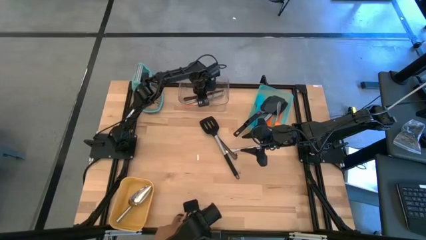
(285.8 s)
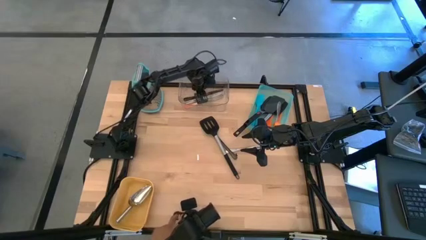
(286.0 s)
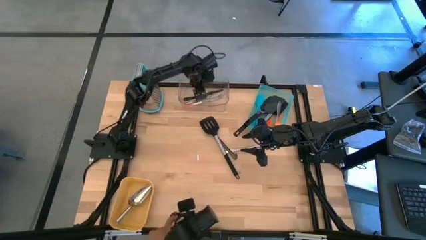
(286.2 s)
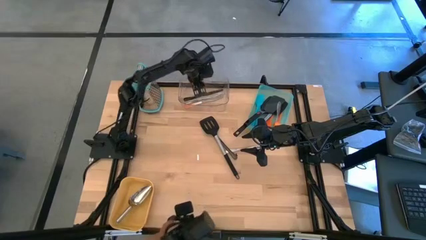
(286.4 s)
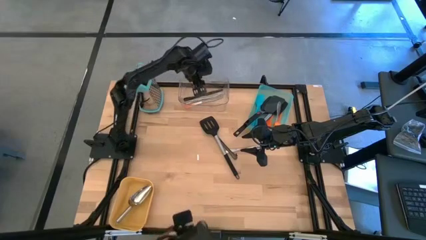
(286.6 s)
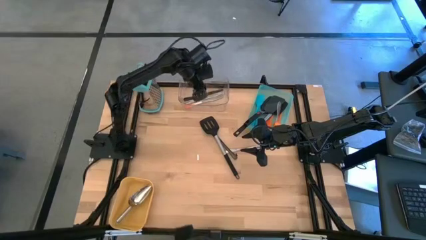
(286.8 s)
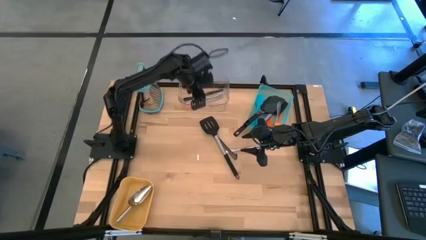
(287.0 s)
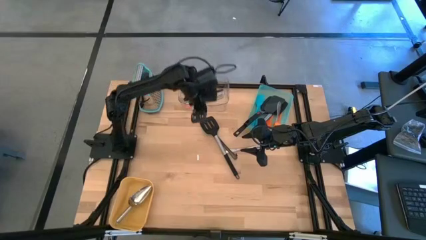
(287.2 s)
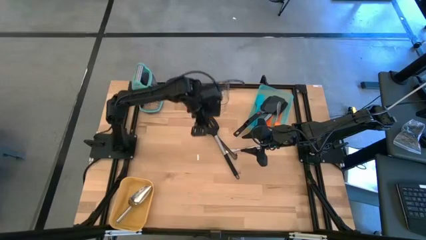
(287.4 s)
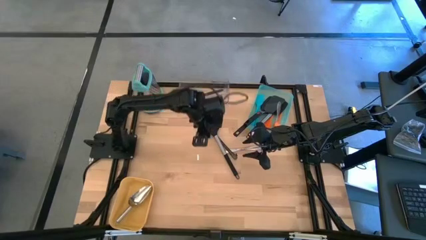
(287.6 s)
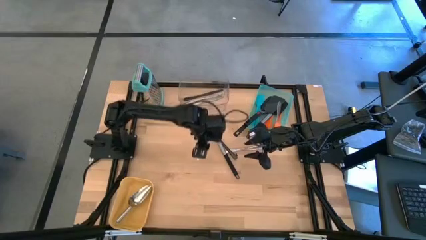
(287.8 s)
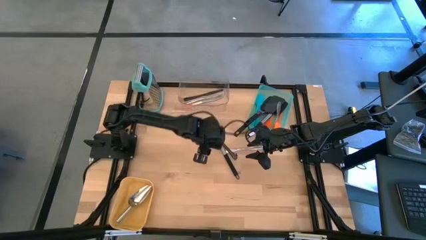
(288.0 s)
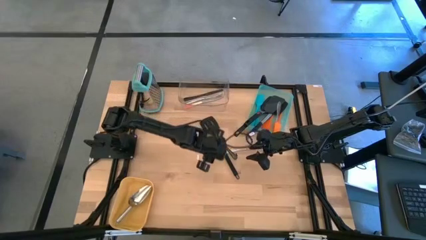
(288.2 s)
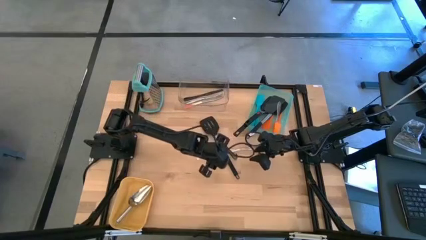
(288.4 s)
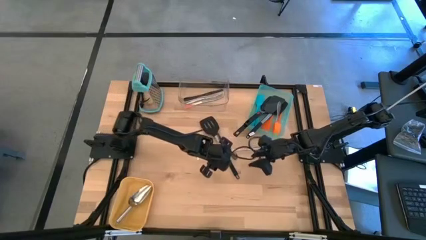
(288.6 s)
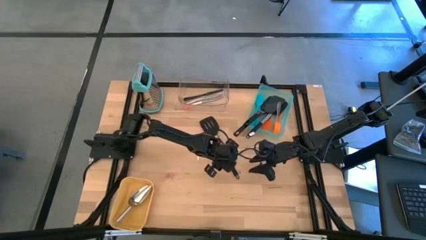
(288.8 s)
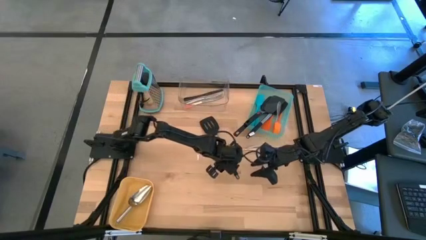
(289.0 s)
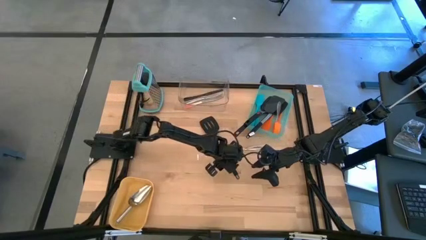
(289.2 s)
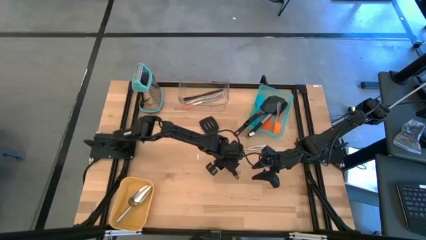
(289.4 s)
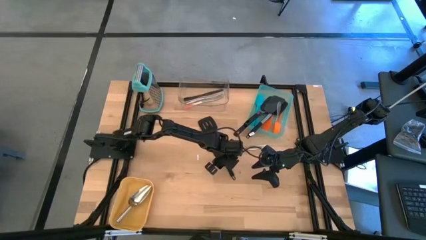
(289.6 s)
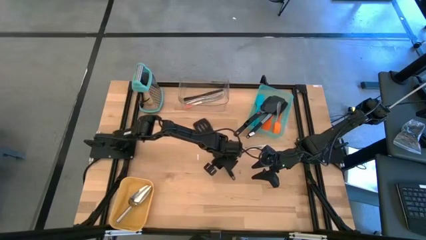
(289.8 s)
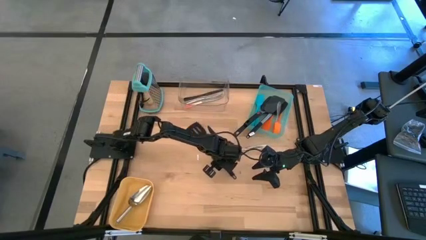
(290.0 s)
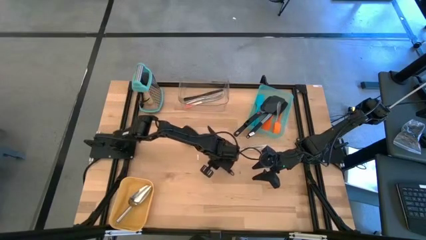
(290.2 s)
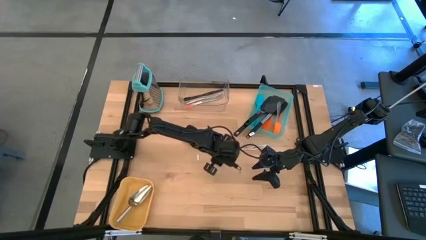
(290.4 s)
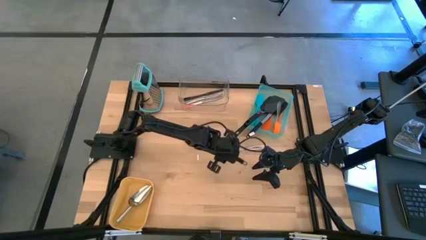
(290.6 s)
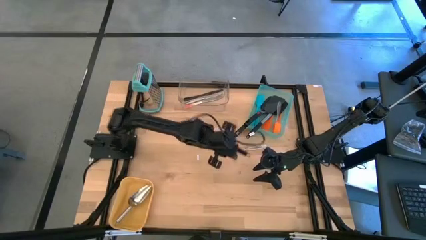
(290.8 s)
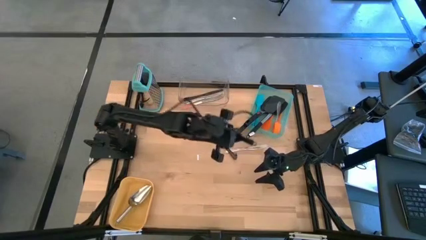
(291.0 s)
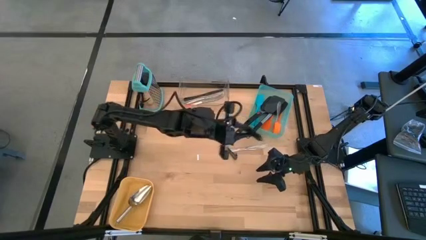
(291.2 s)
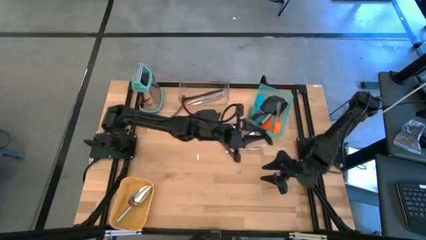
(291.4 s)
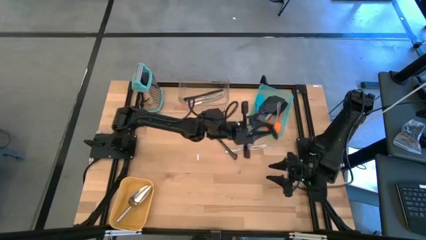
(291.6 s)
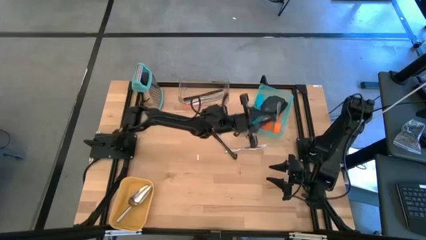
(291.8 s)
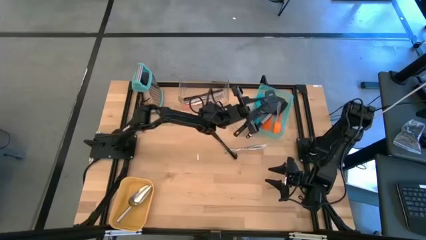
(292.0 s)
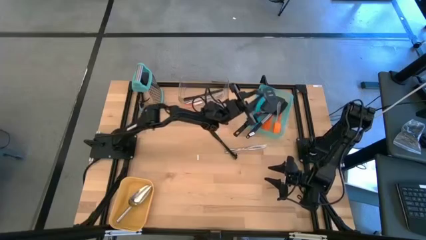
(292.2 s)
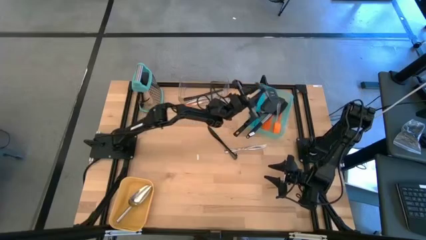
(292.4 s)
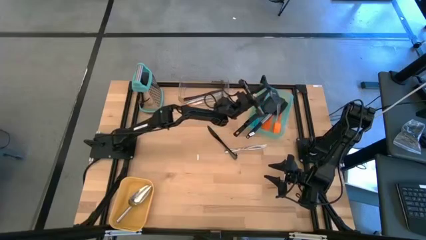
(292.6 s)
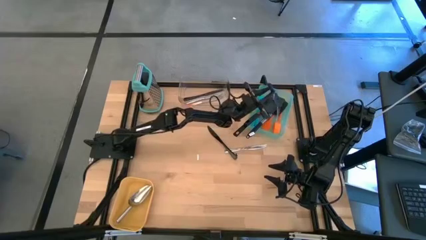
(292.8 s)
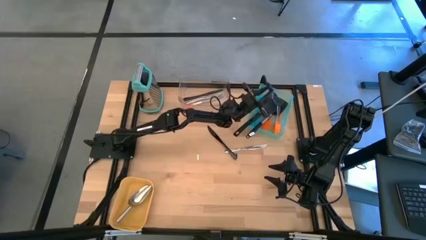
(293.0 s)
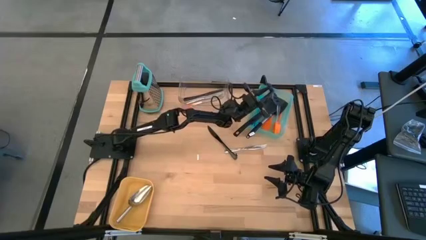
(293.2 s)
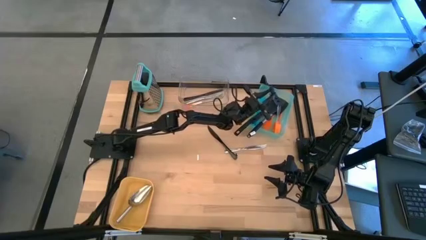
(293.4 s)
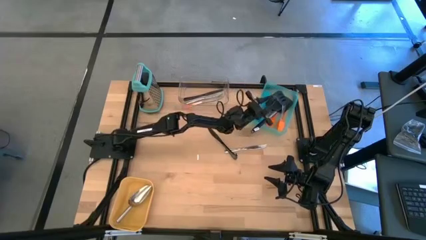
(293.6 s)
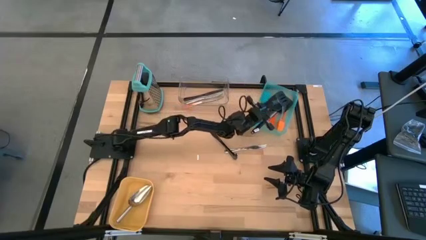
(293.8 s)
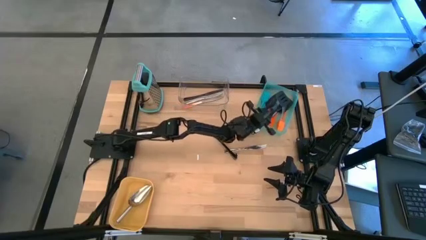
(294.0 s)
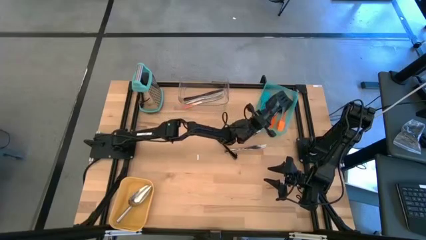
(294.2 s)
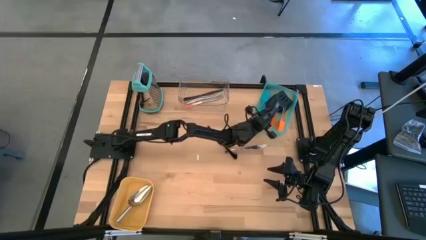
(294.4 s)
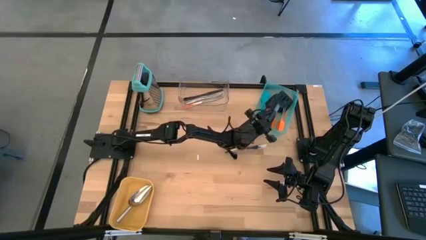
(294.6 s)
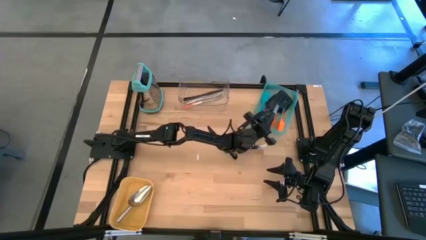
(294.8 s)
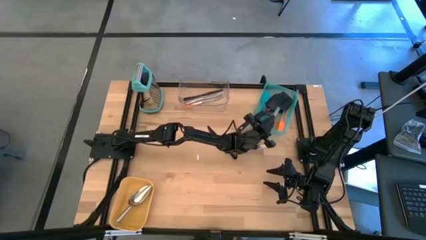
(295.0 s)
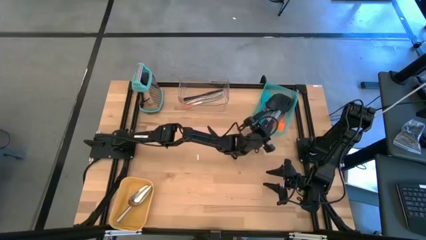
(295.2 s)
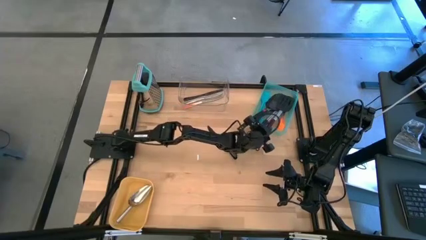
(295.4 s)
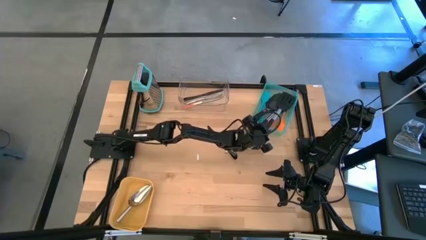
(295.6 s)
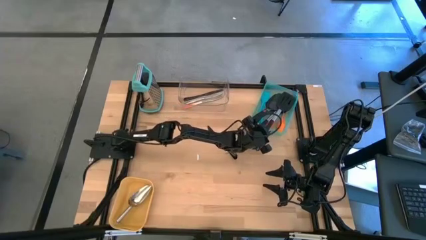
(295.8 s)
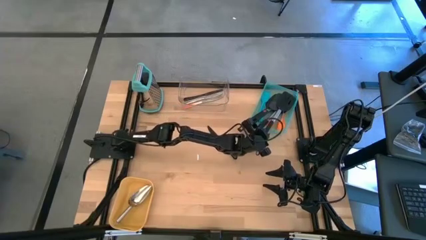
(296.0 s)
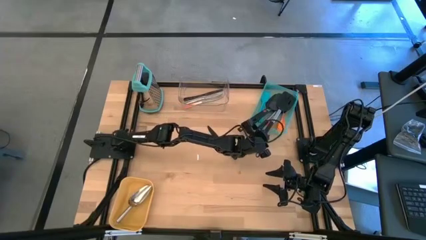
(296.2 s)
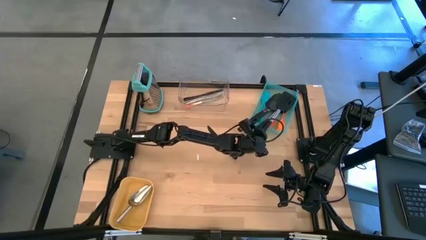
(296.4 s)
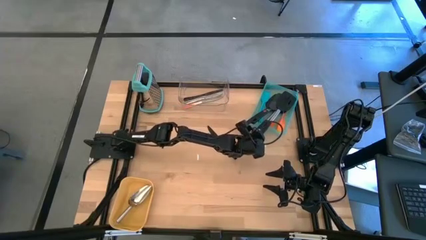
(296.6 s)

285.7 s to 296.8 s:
Task: Pick & Place Kitchen Items
Put the black slotted spatula into the green bin

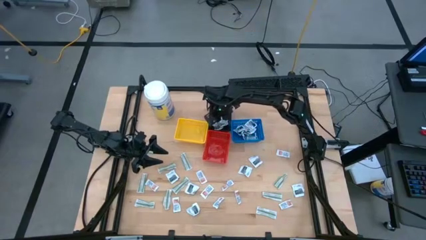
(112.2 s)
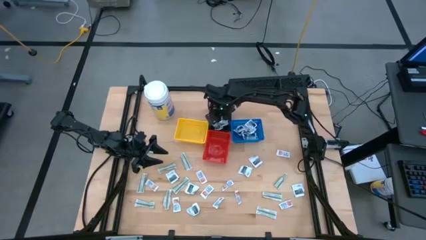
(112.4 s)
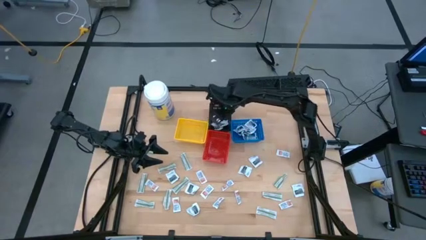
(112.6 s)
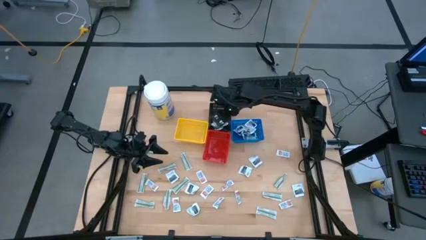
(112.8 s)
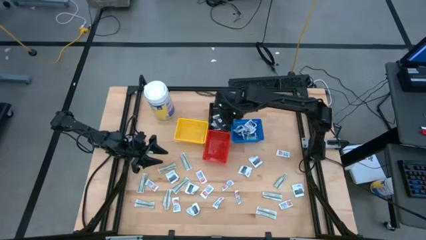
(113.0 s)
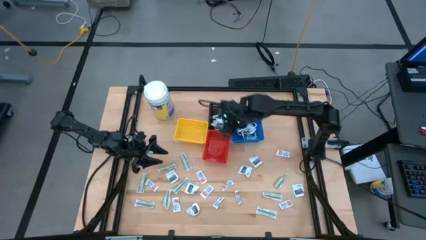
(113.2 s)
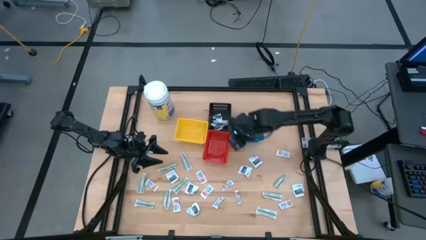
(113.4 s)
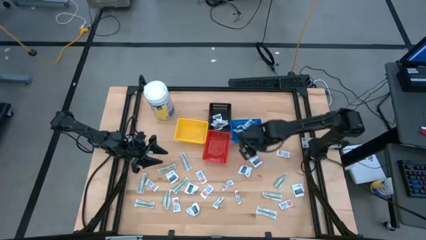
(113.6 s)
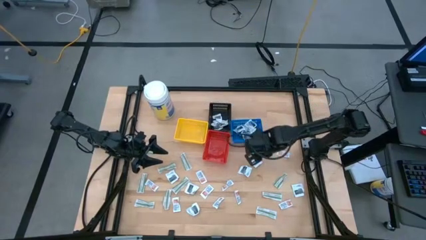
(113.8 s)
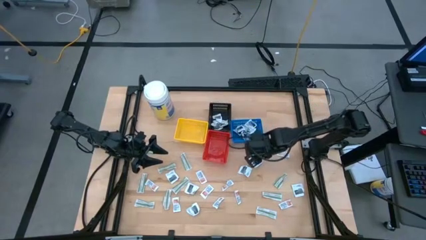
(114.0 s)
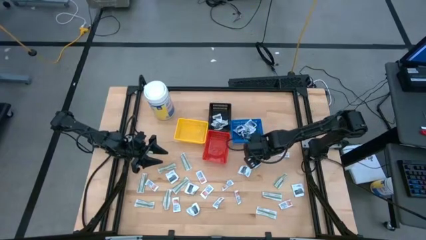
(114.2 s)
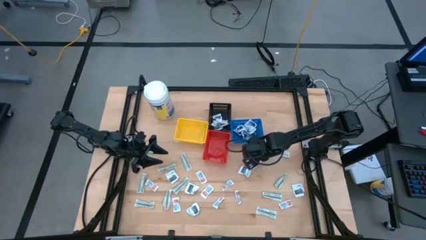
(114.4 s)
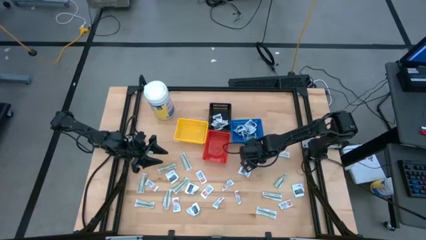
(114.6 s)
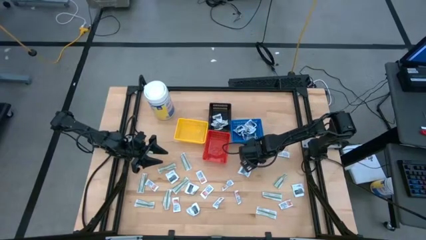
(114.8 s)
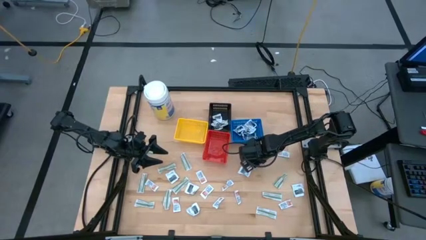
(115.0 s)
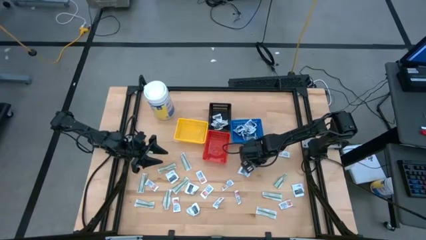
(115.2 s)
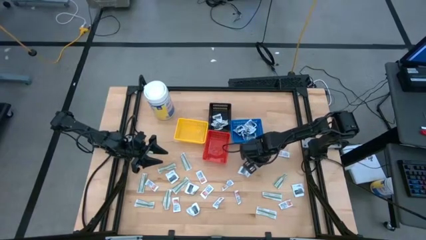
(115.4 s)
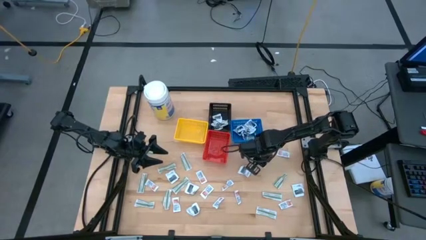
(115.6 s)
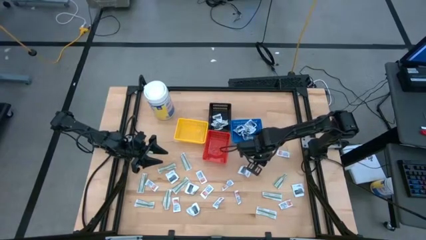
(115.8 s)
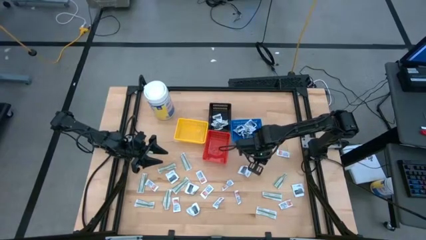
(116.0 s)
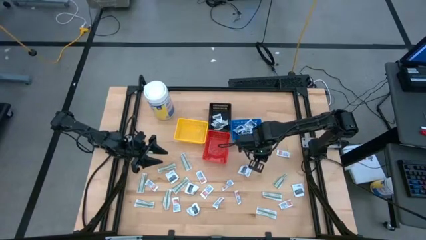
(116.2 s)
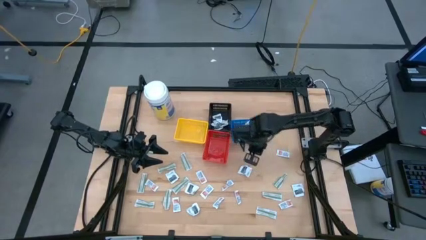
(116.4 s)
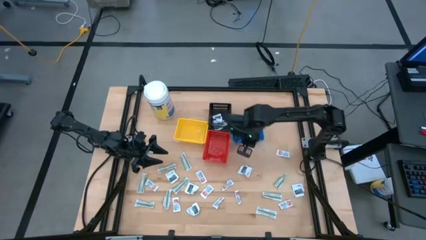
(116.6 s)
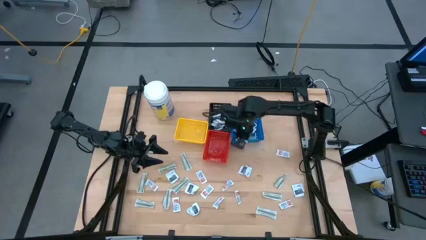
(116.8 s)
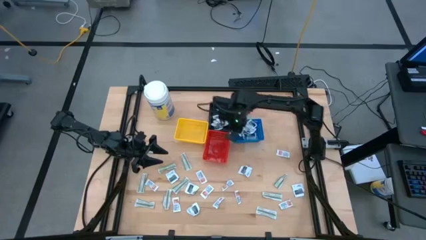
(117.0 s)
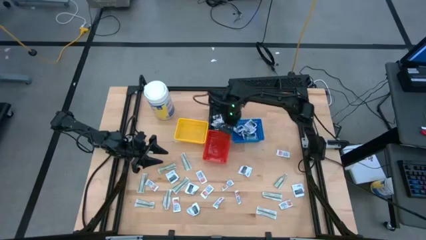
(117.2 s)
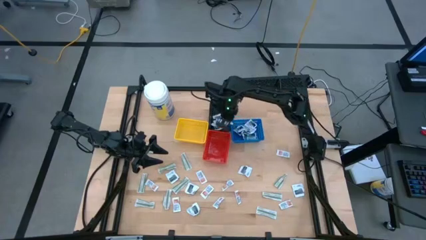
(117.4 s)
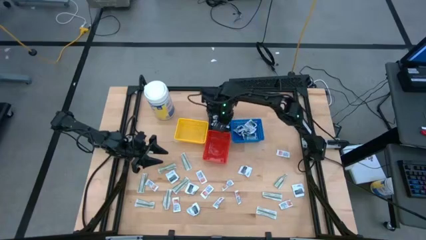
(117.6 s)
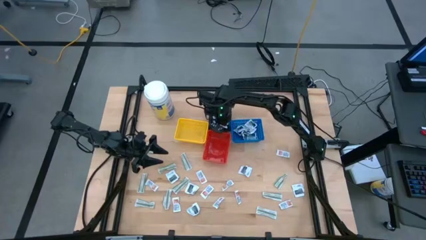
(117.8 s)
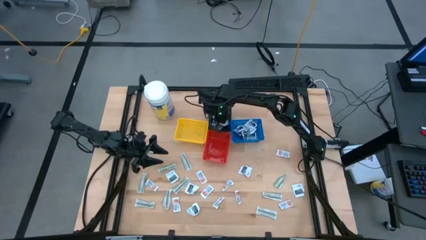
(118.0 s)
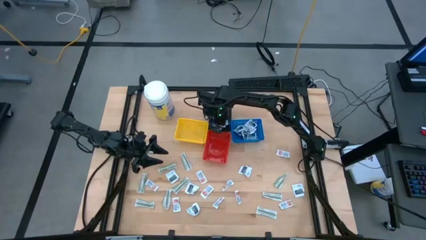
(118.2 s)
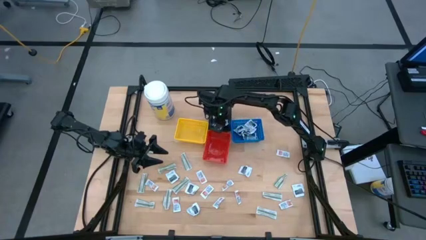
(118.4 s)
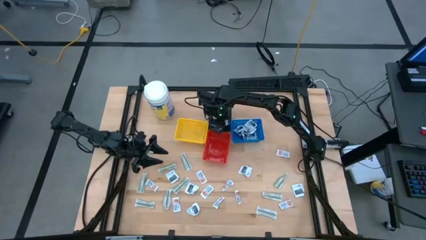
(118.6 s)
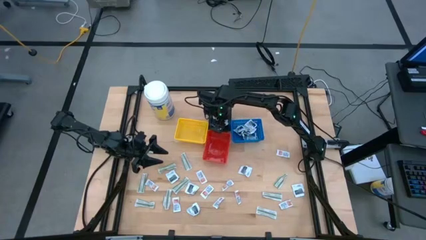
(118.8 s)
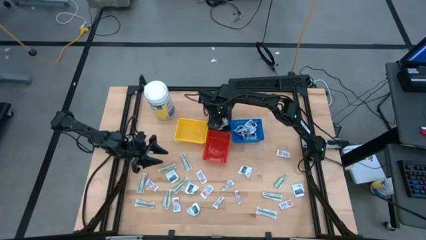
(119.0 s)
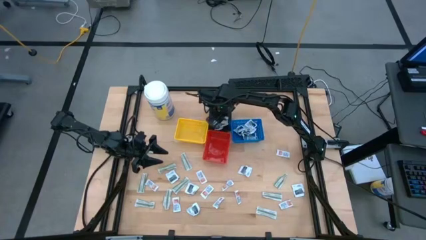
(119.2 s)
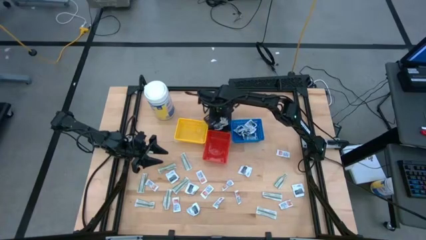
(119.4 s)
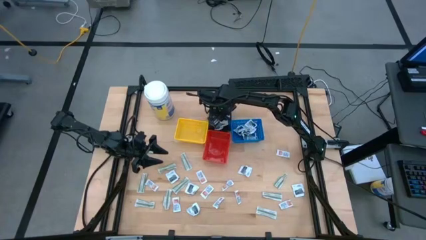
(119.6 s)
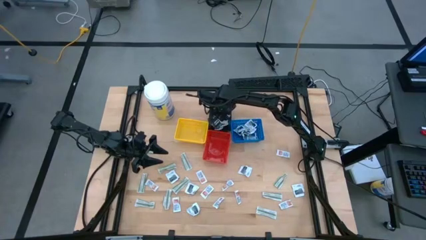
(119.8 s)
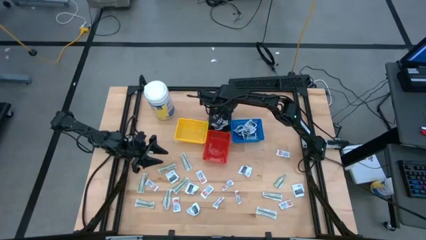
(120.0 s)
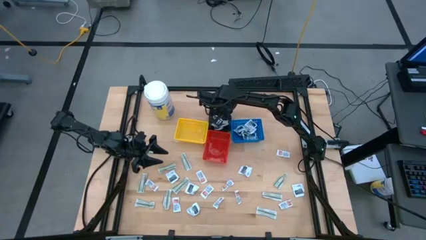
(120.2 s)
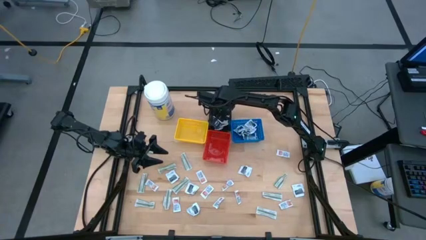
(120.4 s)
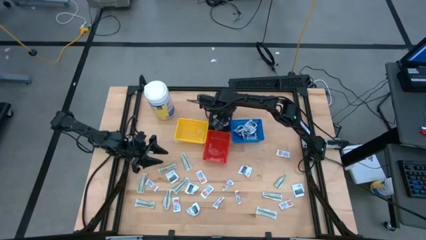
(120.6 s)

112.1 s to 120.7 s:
Task: Pick & Place First Aid Supplies
Put the towelette pack into the black bin
